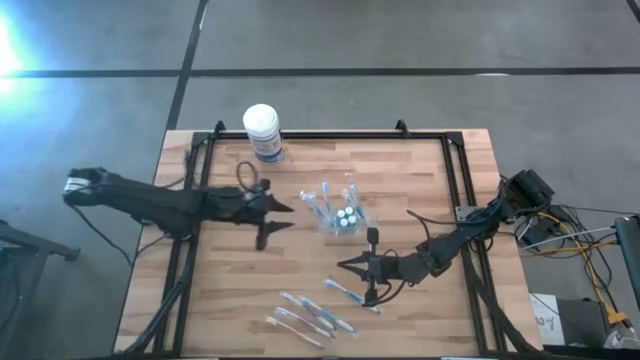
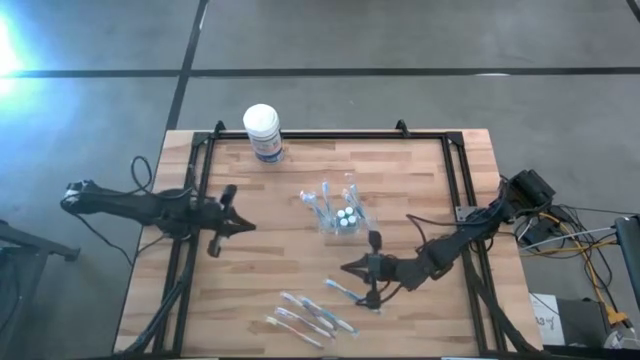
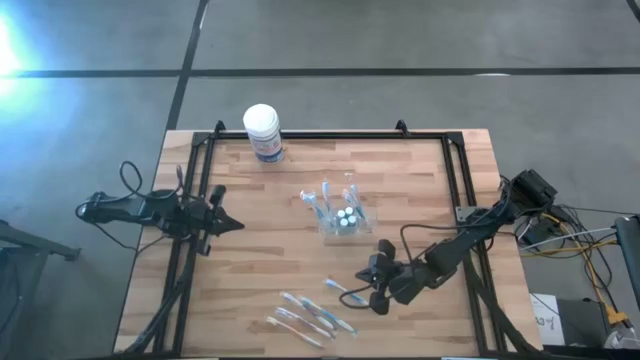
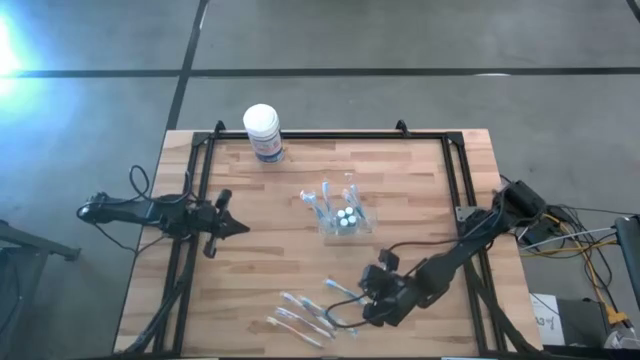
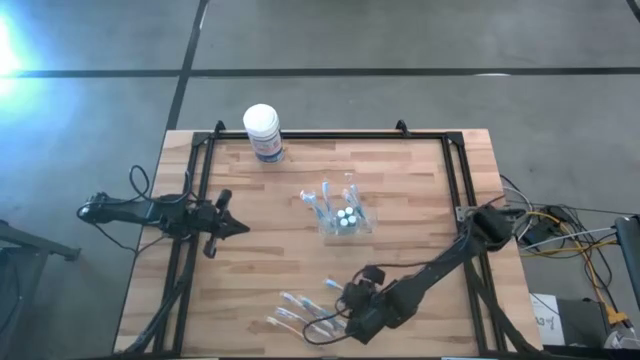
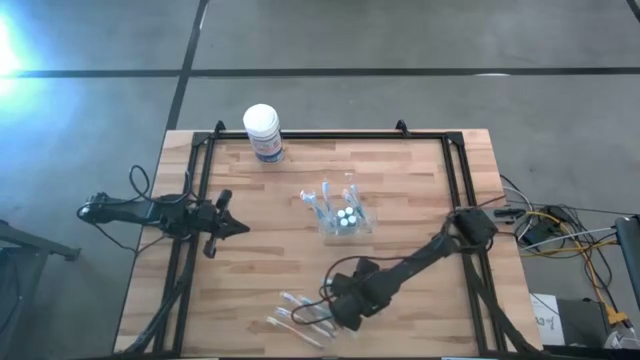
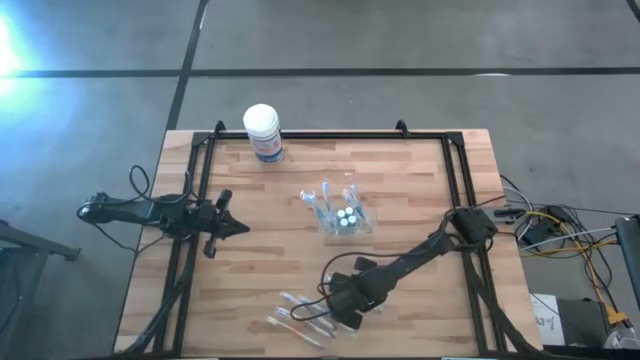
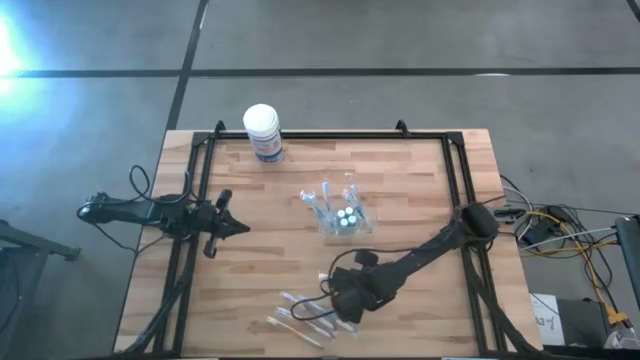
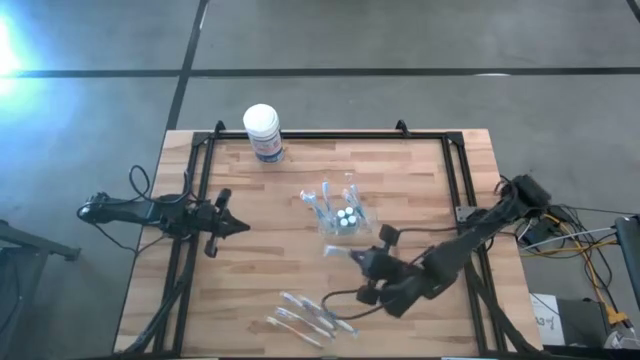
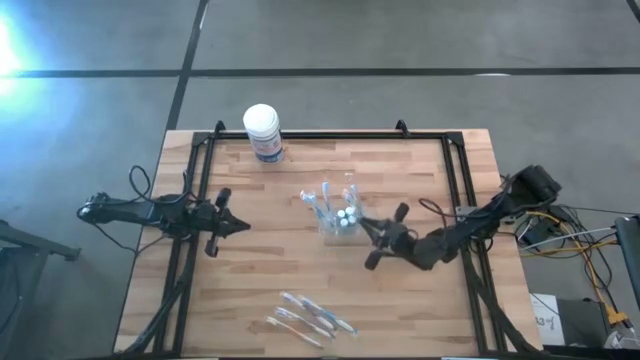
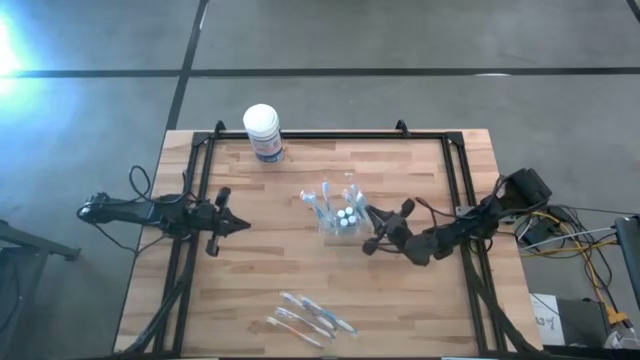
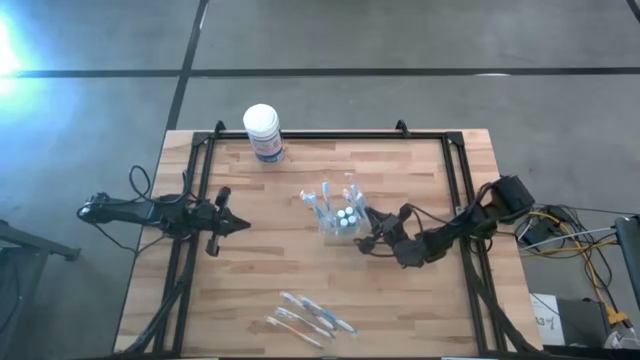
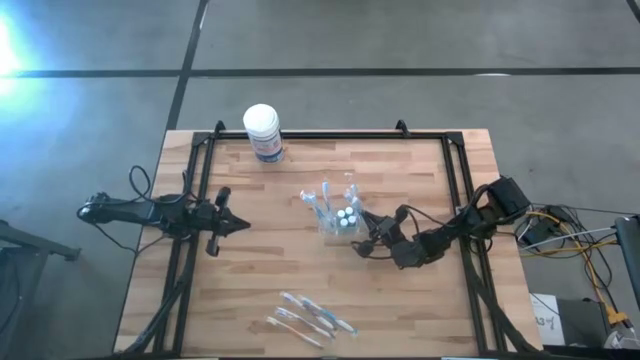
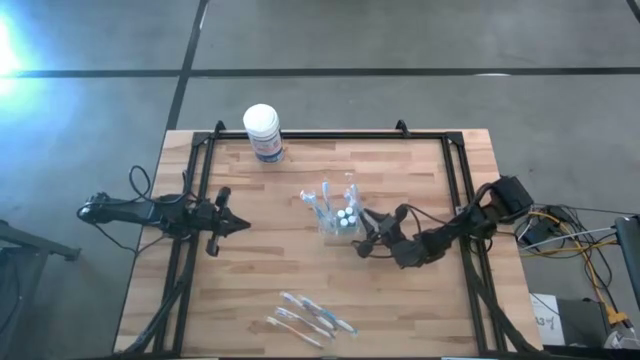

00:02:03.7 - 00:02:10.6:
Task: Pick & Place toothbrushing station
Put the blue toothbrush into the transparent organizer

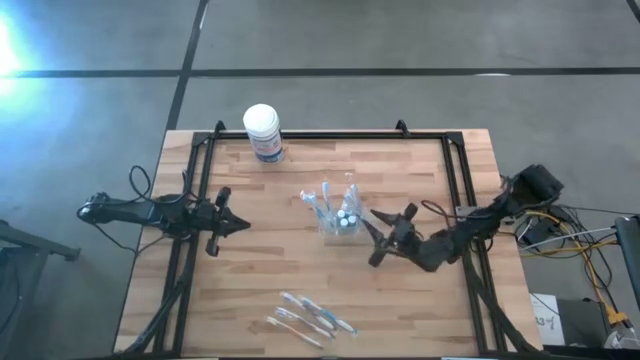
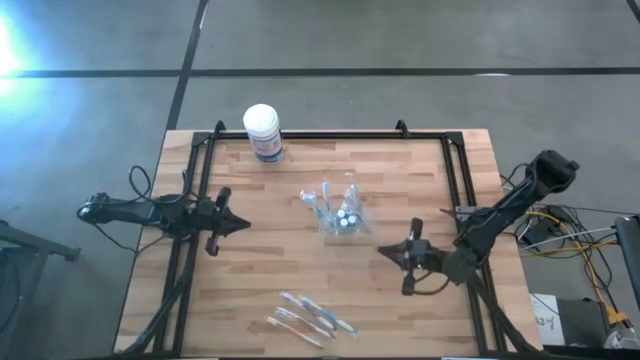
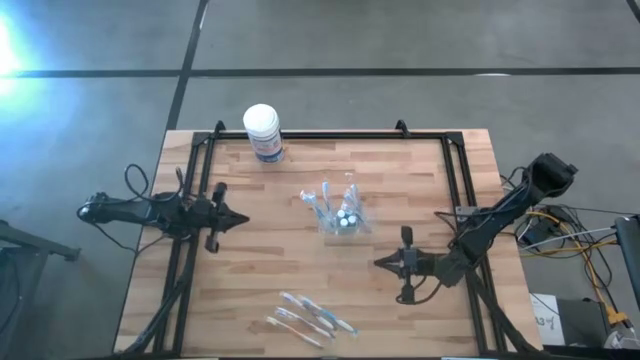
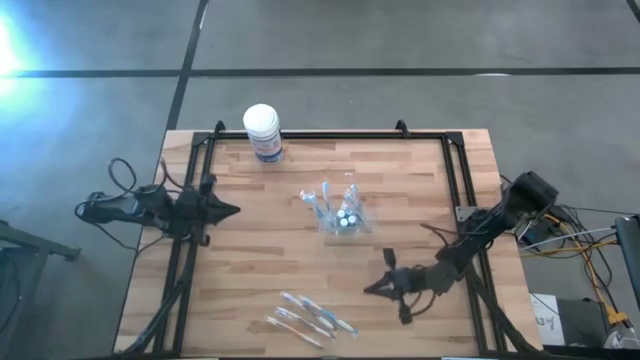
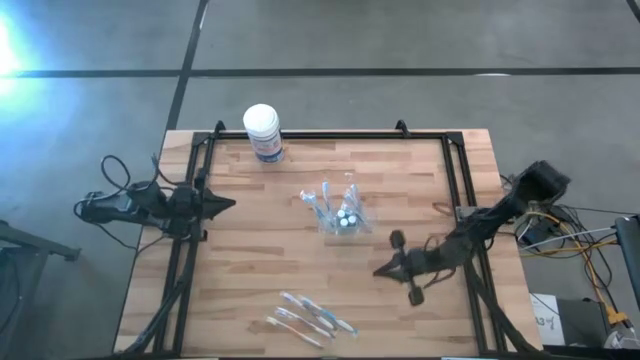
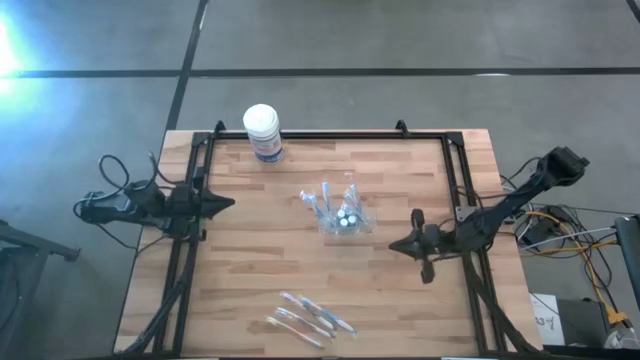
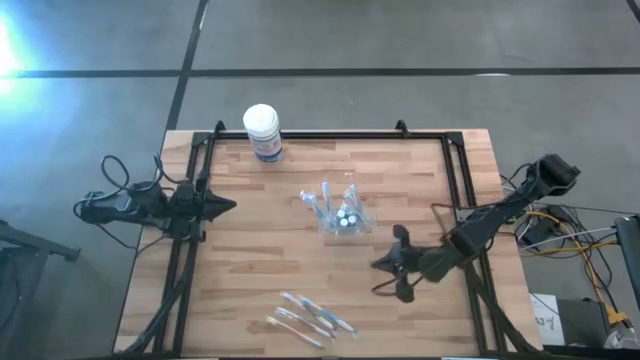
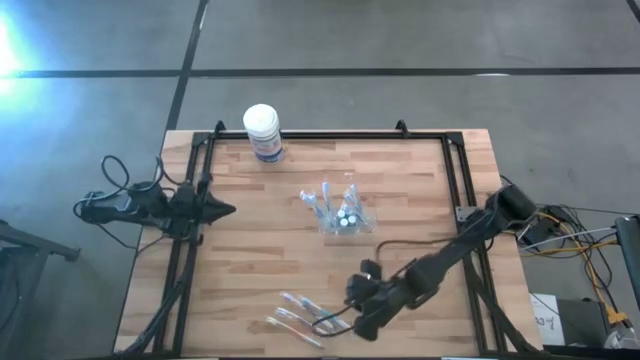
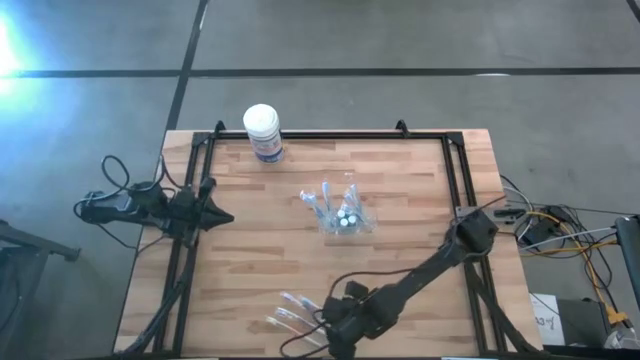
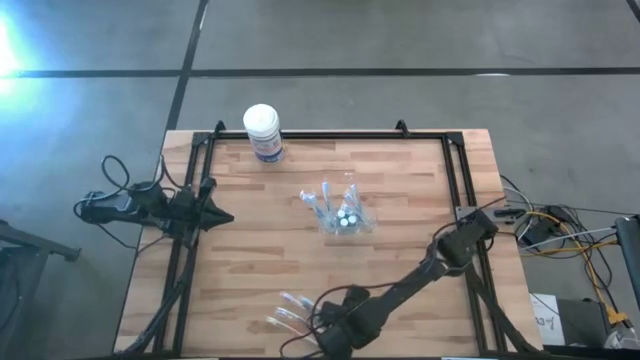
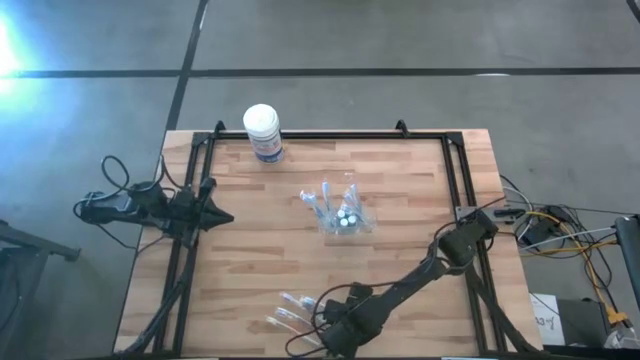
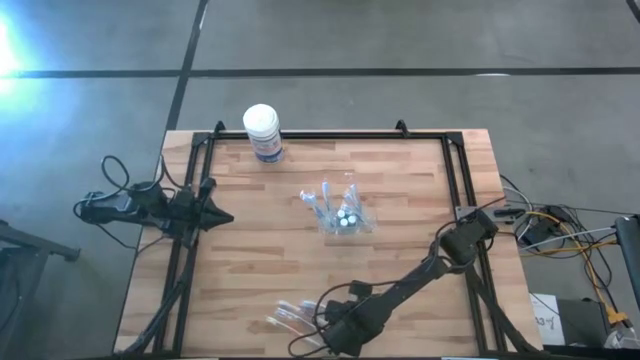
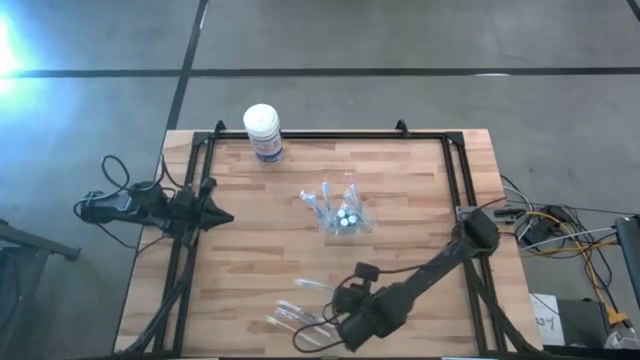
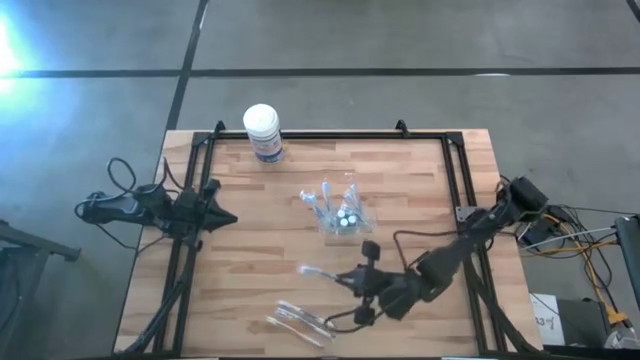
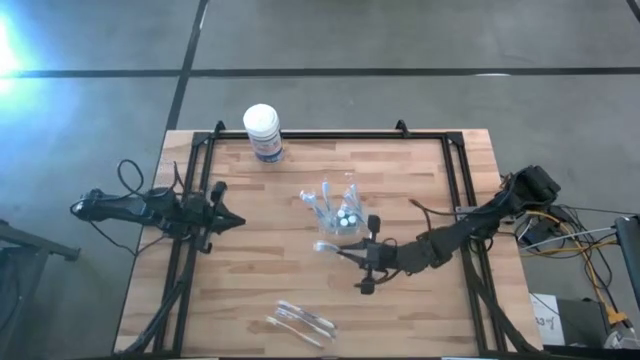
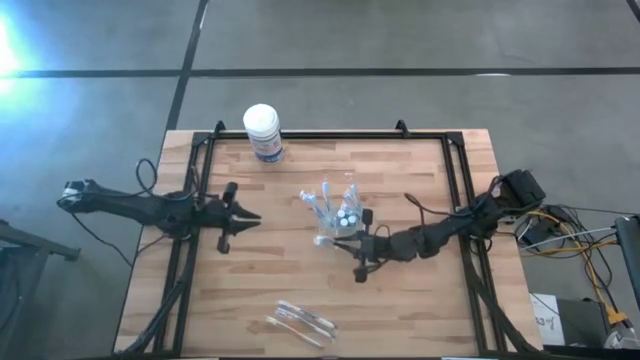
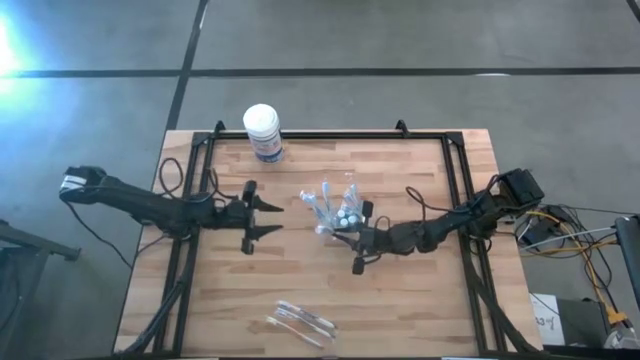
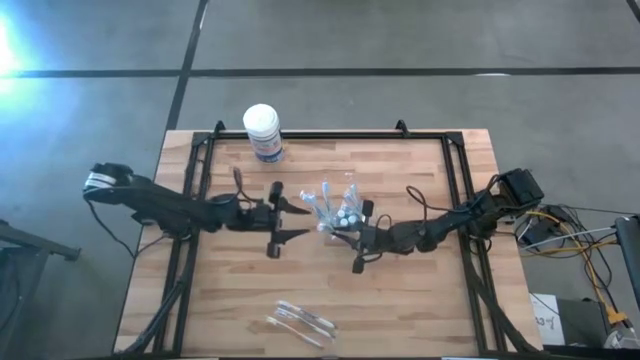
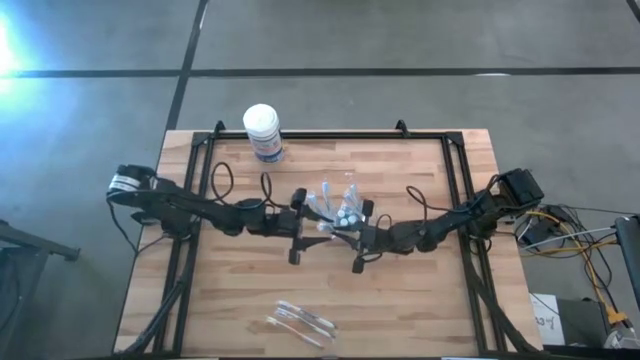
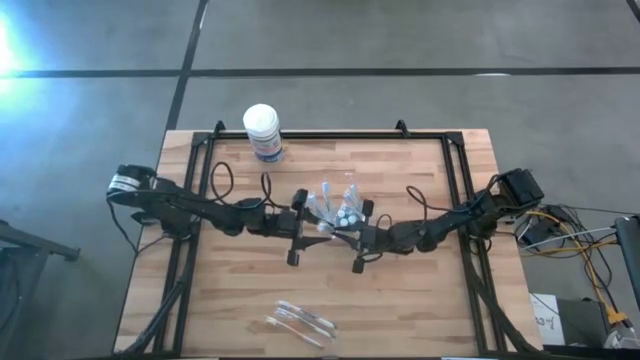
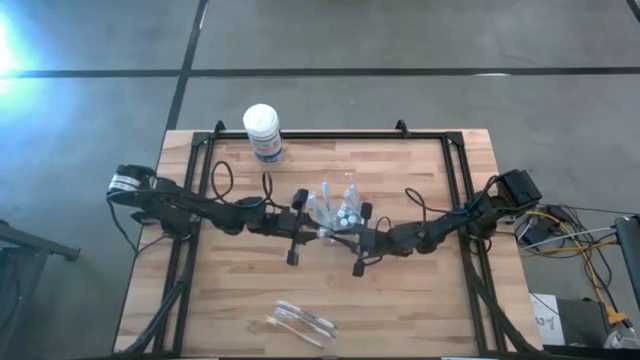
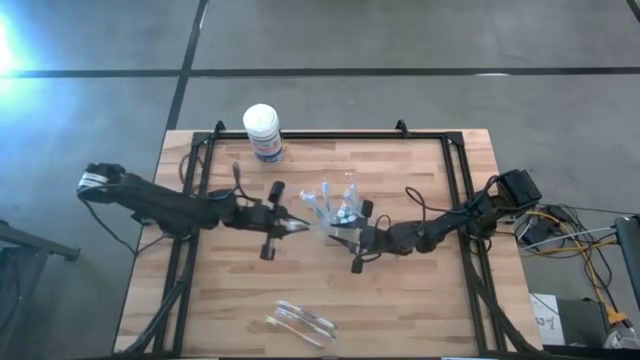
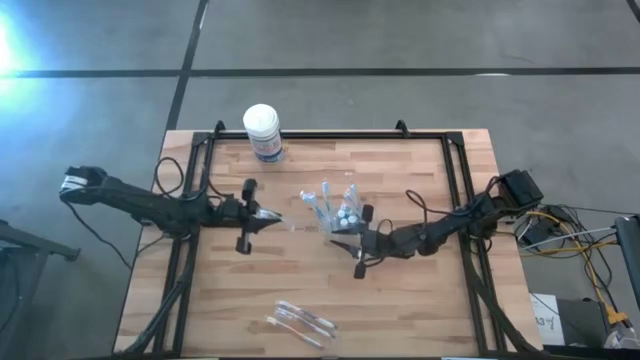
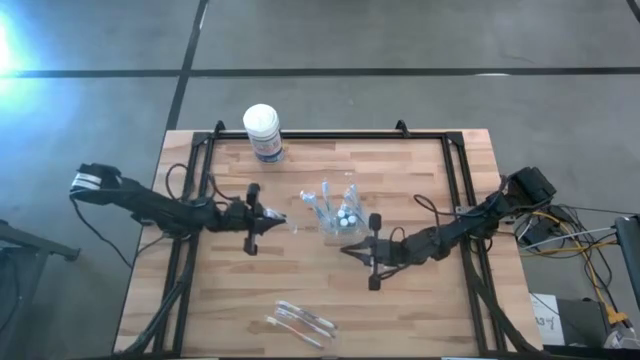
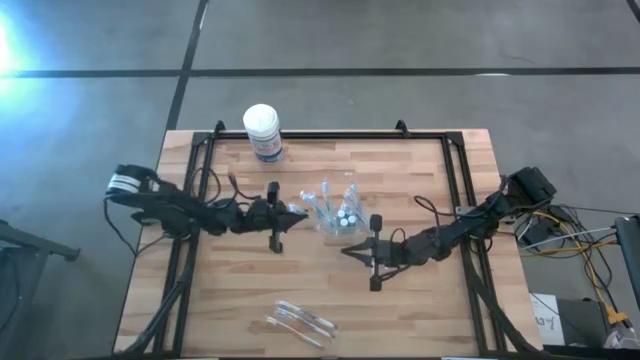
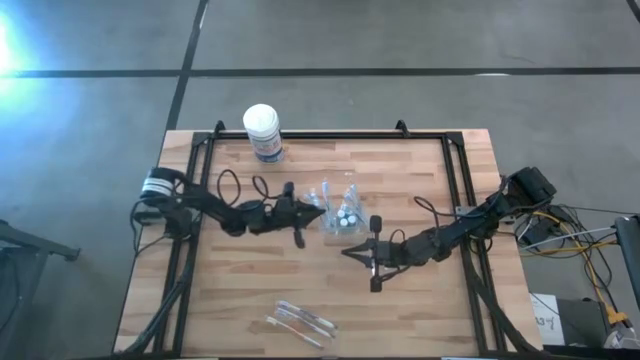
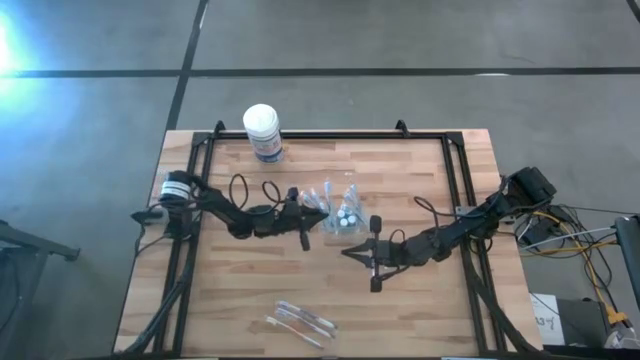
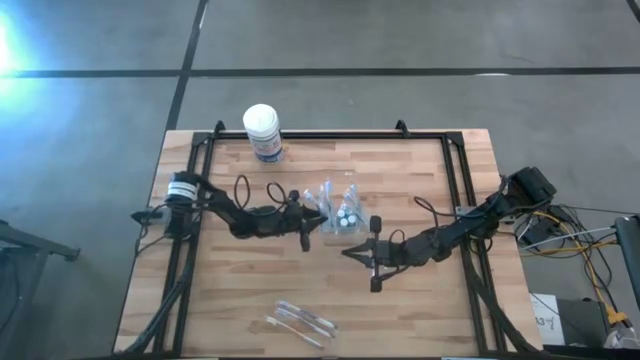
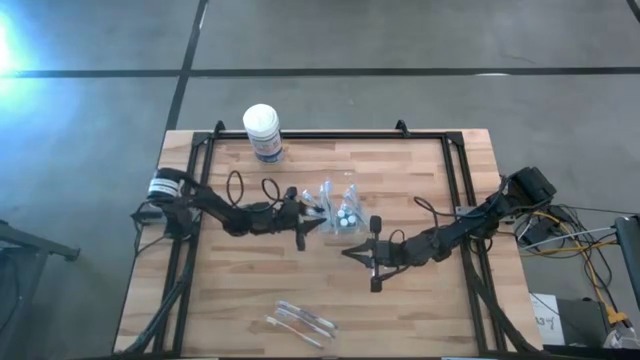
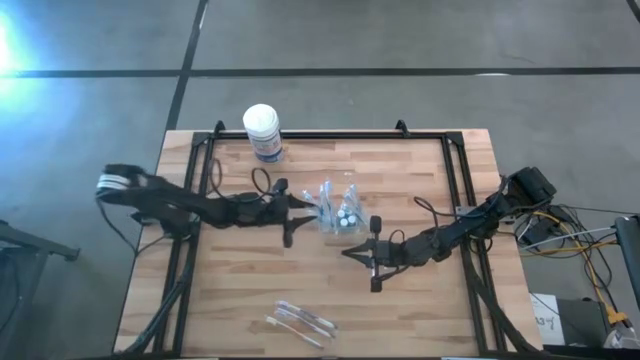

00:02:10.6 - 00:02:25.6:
Put the blue toothbrush into the transparent organizer
